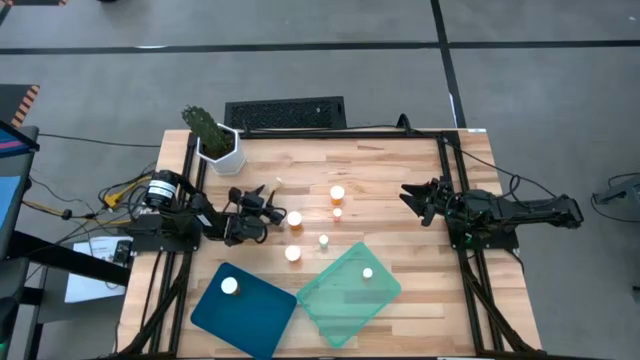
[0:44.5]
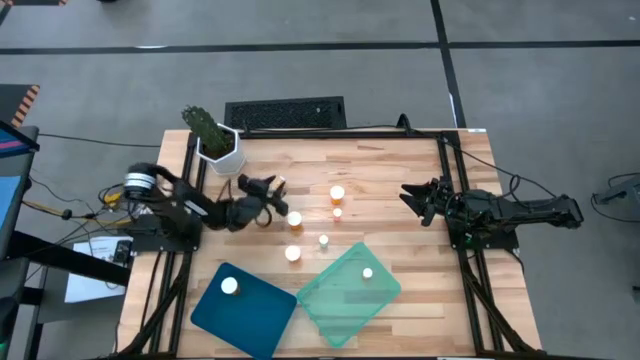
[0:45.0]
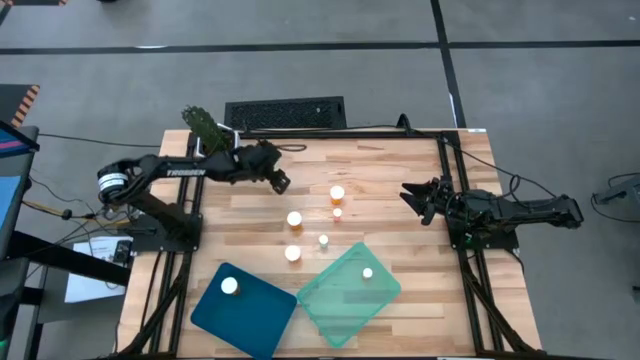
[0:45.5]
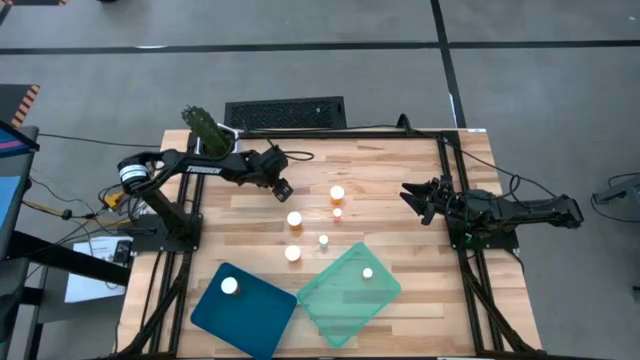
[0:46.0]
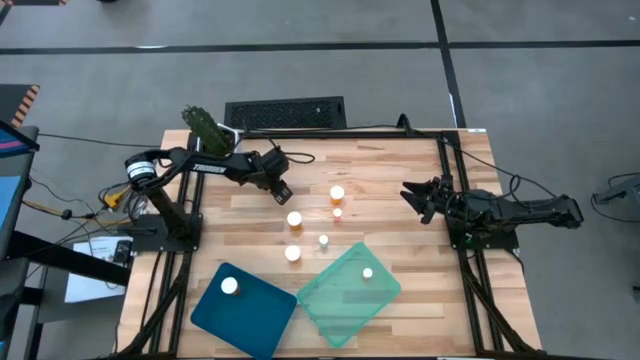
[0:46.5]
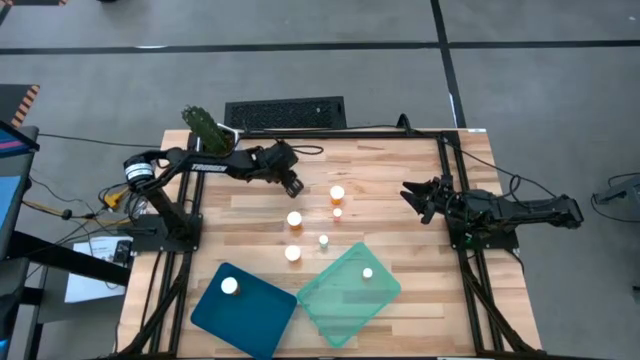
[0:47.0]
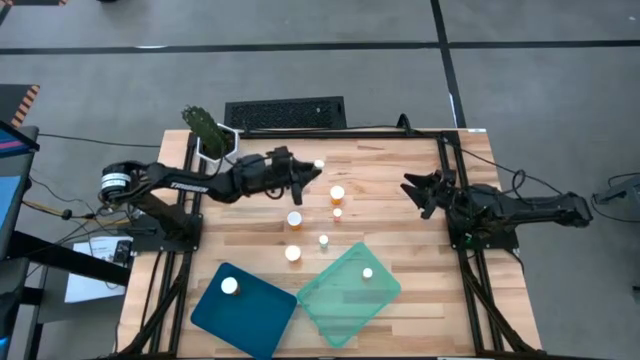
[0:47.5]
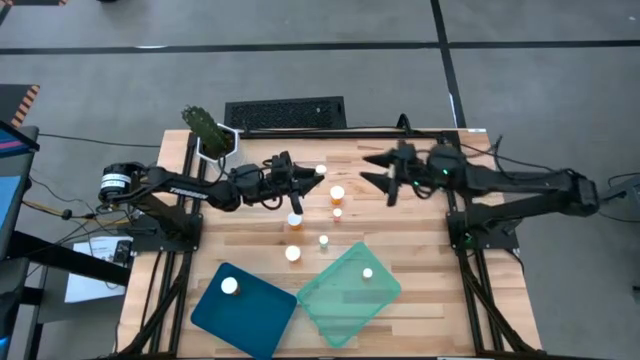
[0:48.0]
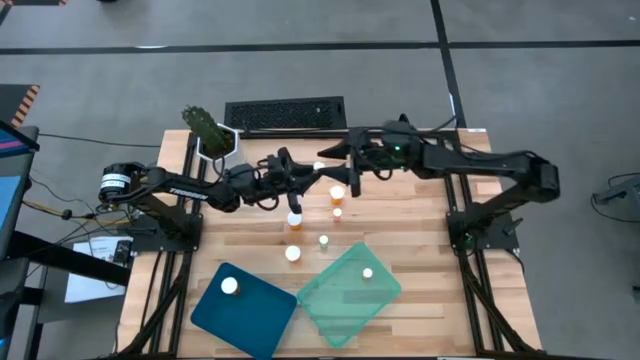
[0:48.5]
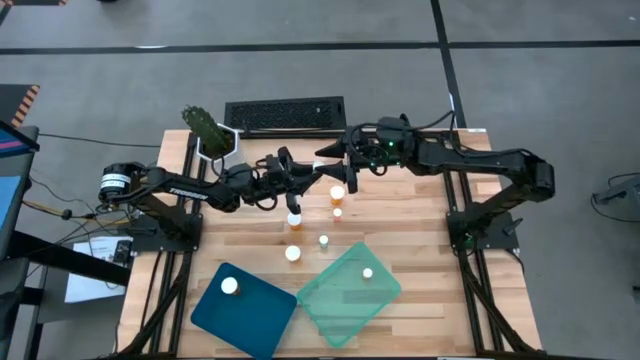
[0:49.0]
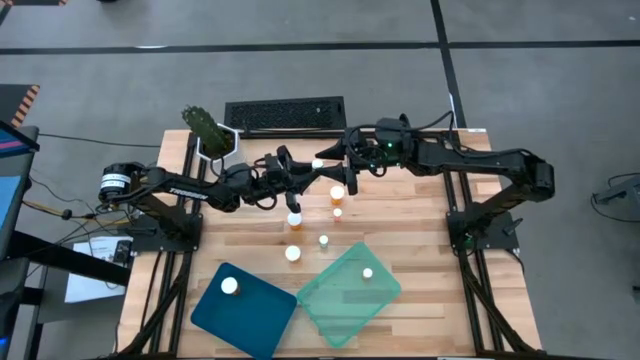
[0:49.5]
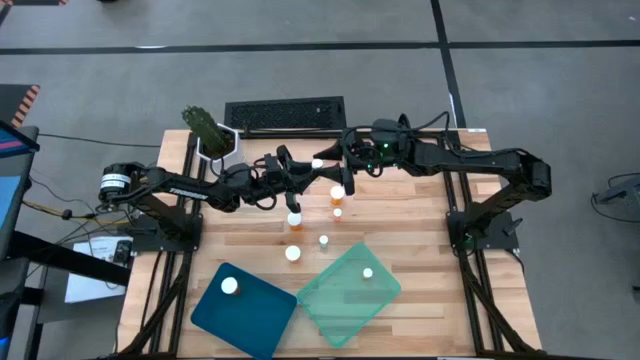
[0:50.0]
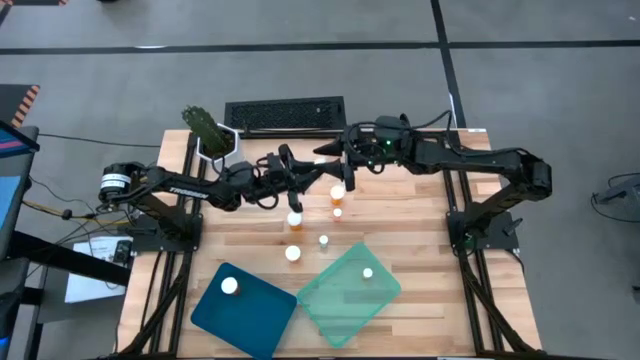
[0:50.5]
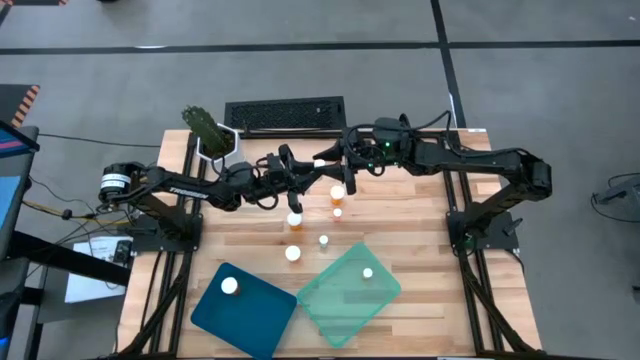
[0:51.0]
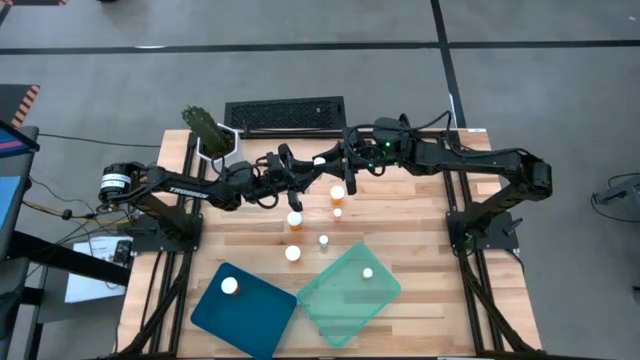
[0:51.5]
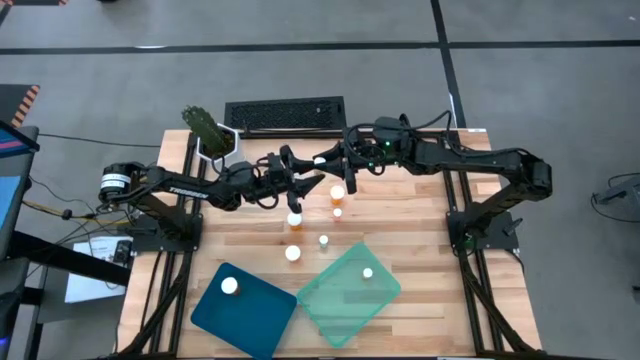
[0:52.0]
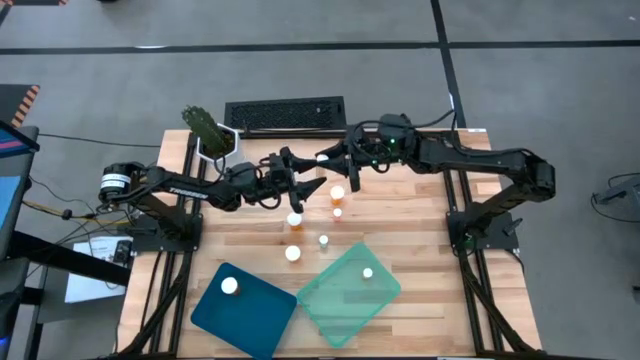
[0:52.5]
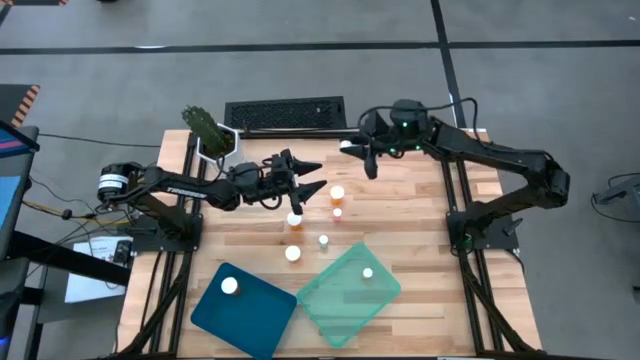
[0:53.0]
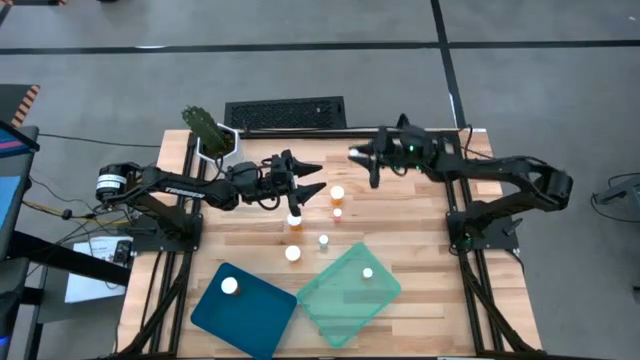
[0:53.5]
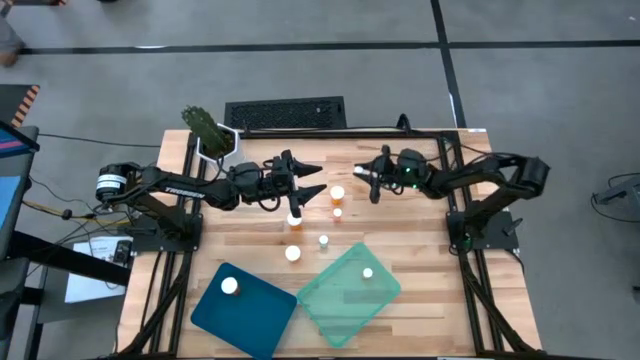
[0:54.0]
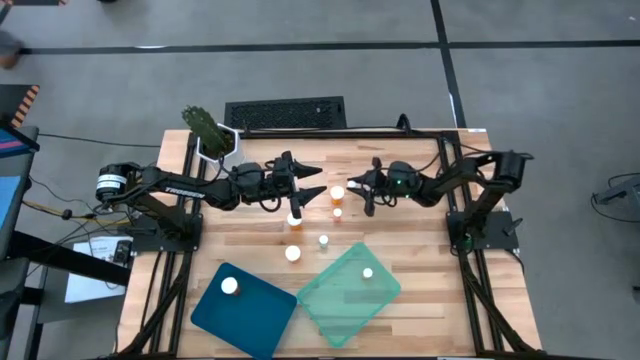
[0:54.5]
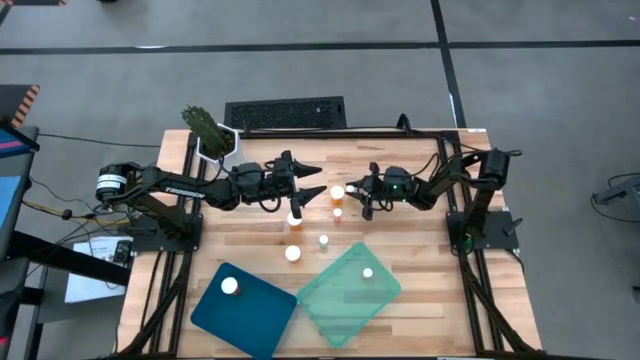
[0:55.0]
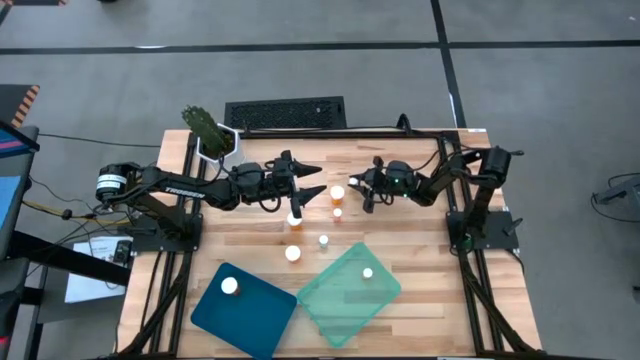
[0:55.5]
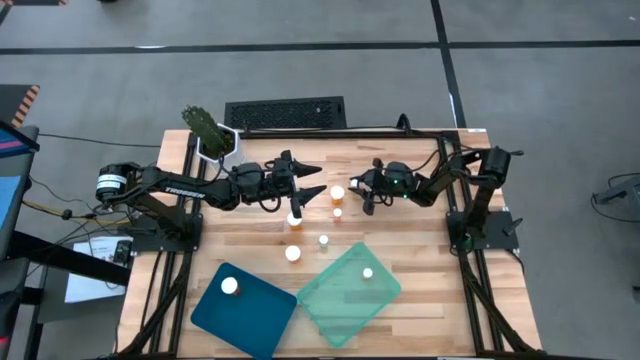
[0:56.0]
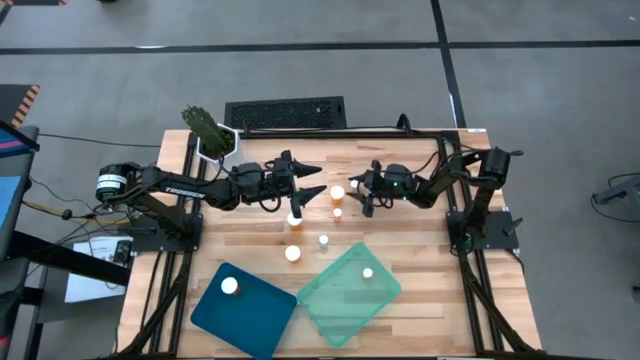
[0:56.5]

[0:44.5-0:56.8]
Task: Pick and place medicine bottles into bin by pill shape (circle, oval)
Move the small yellow pill bottle to the top of the table

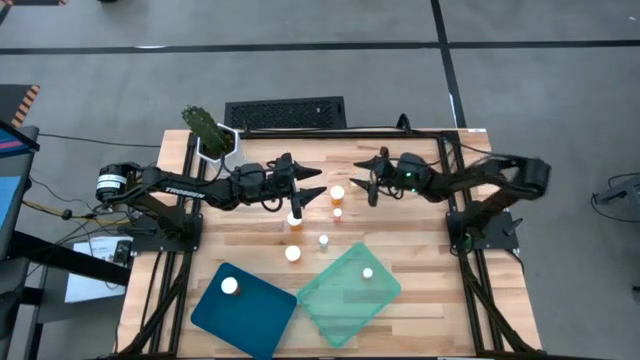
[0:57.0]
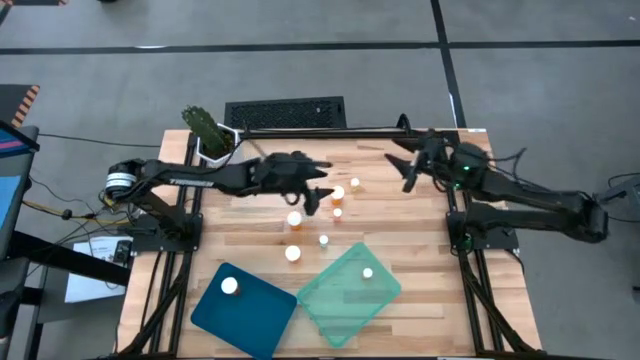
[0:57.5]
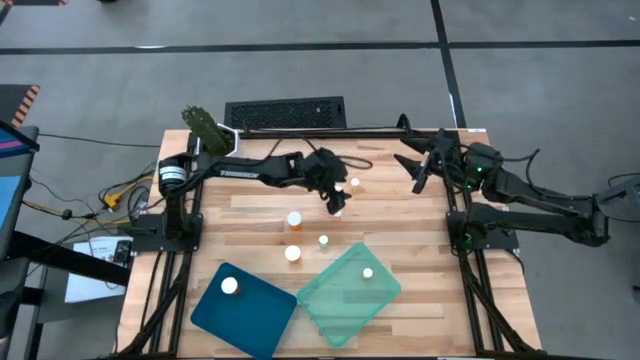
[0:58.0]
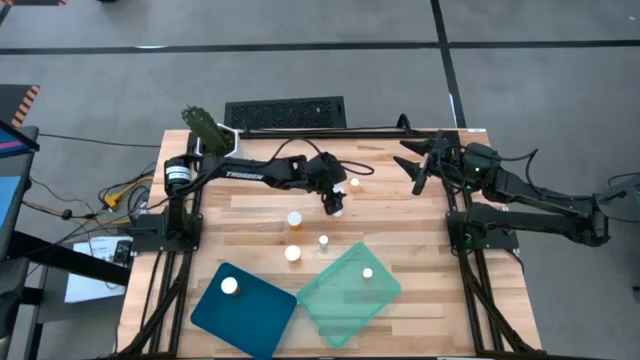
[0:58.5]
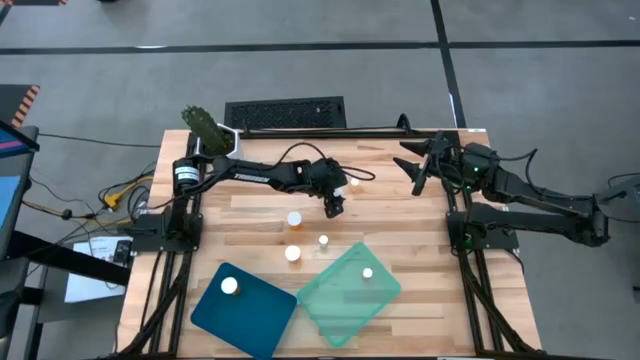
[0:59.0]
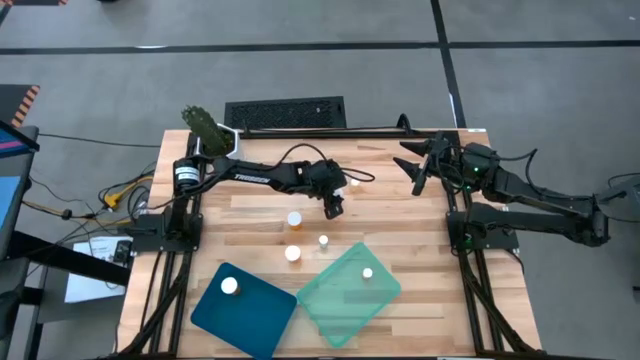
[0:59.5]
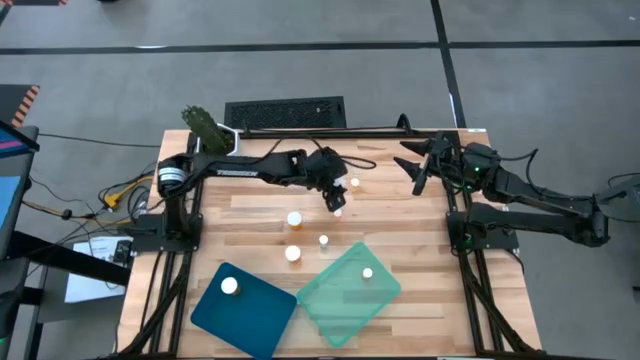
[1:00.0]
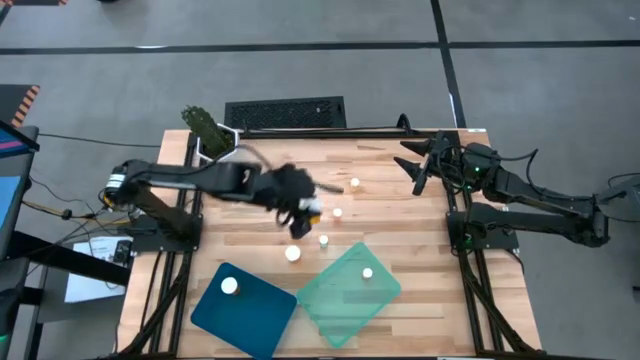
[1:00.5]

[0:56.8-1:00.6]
Put the big orange pill bottle into the blue bin

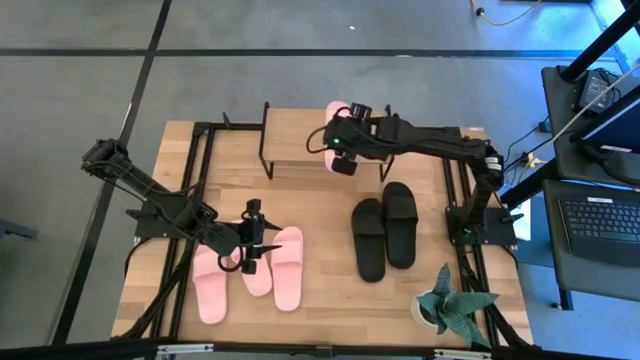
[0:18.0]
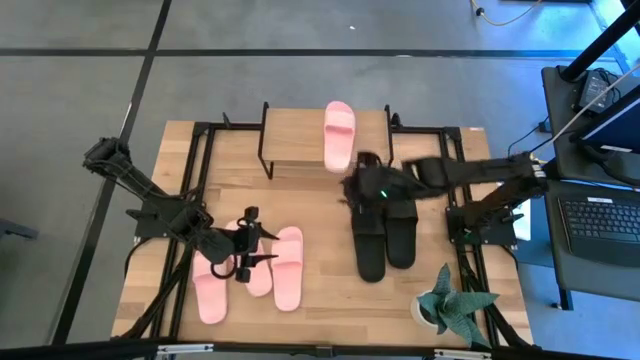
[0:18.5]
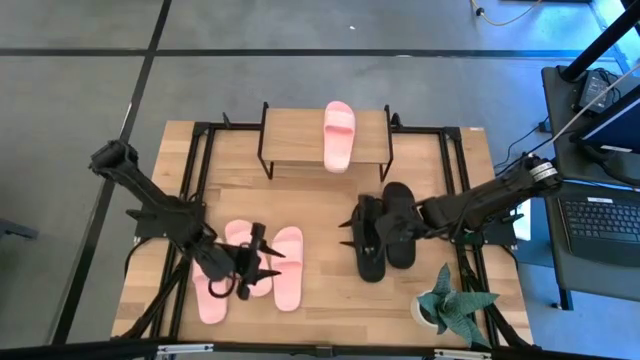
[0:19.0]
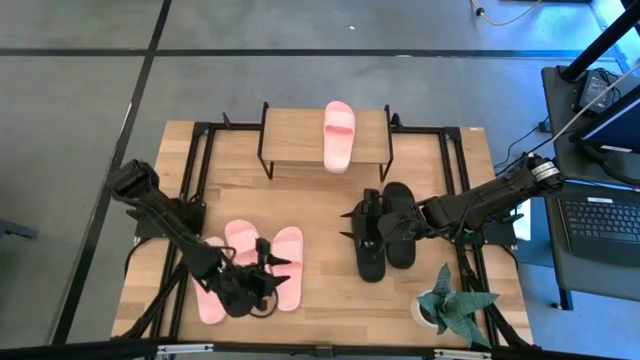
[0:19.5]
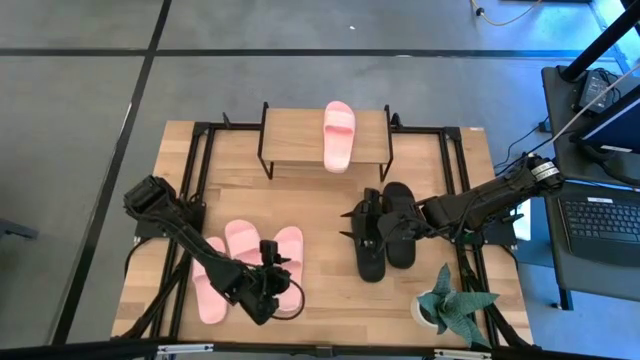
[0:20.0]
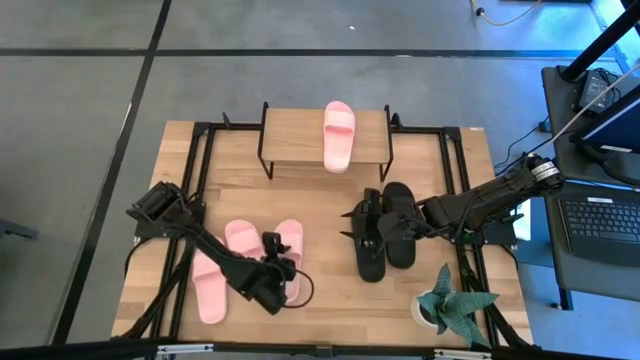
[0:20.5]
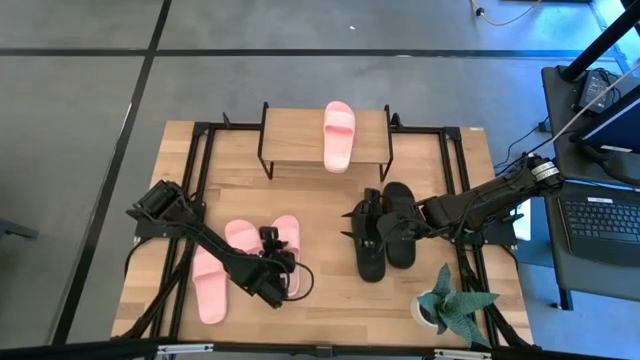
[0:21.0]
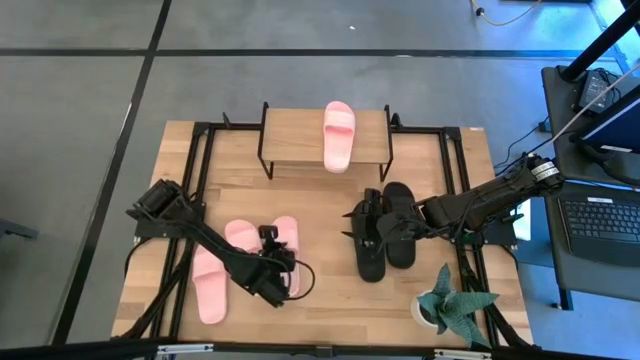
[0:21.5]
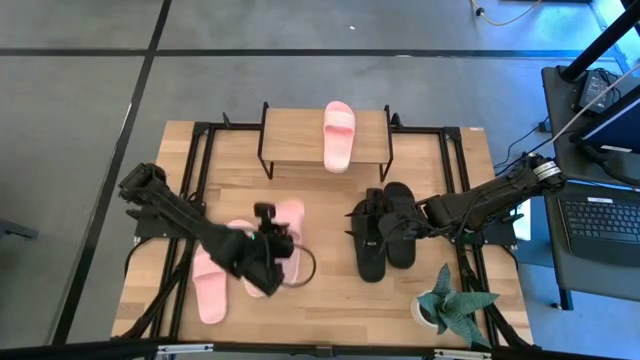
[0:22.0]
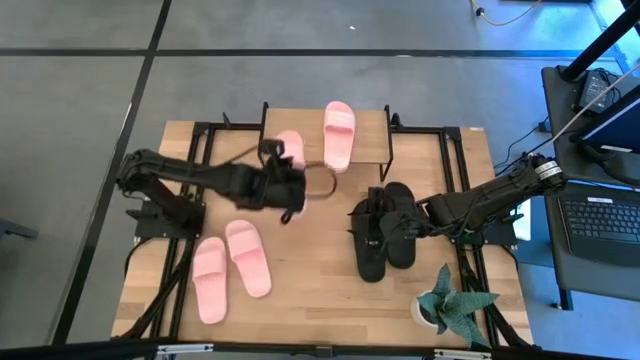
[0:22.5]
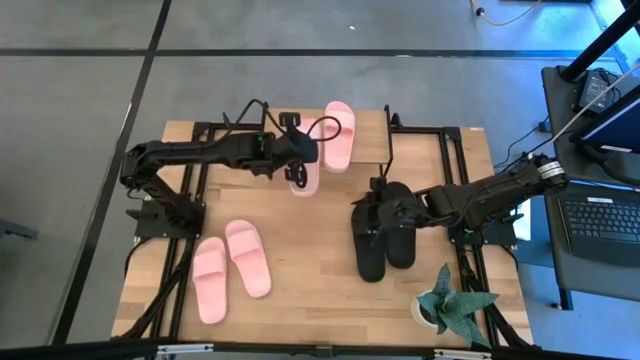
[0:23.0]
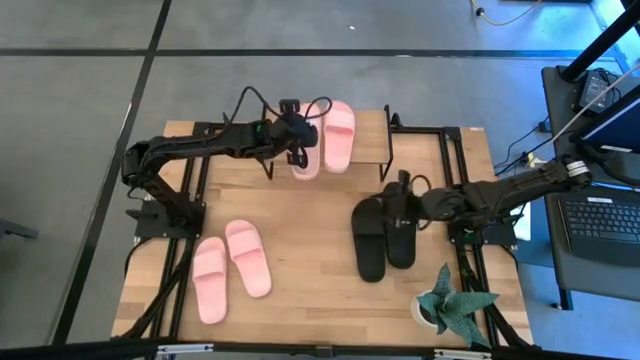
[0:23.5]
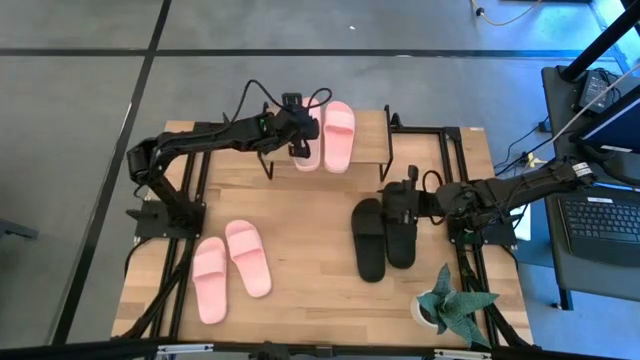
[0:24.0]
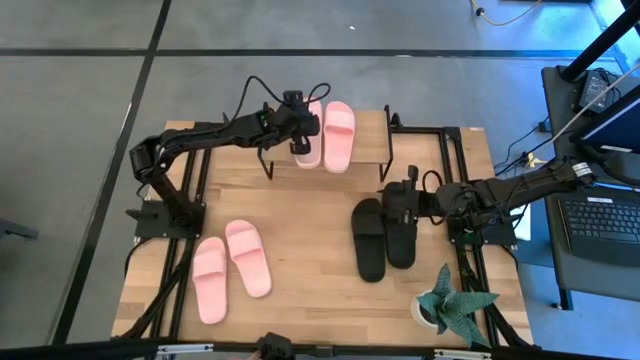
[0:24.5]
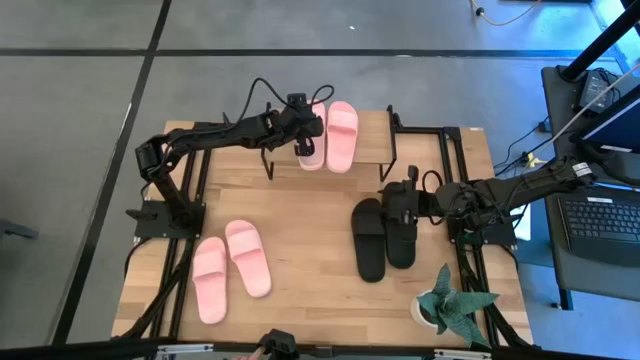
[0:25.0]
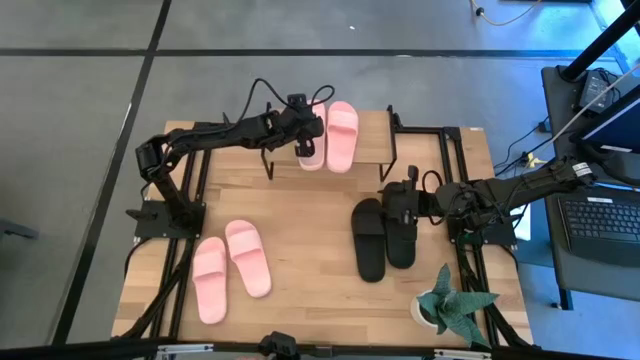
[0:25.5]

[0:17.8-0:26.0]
Task: Pick and place slides into the shelf
Put the pink slipper slide on the shelf
